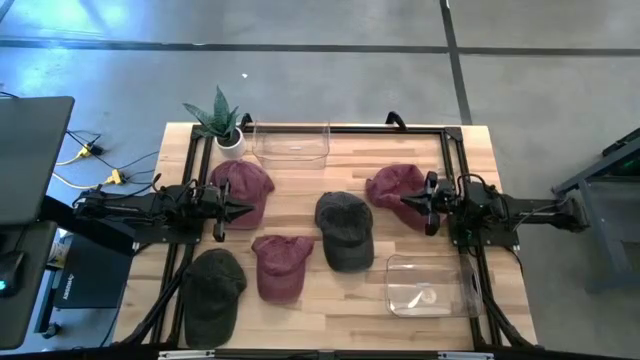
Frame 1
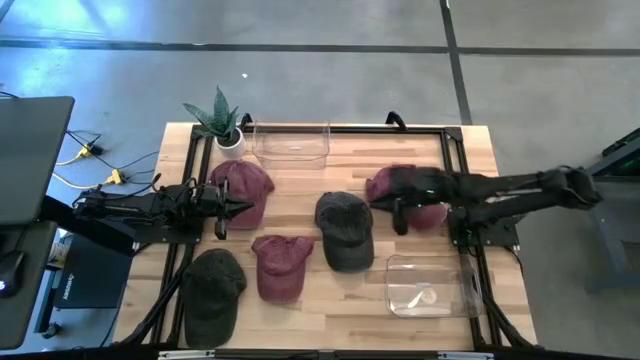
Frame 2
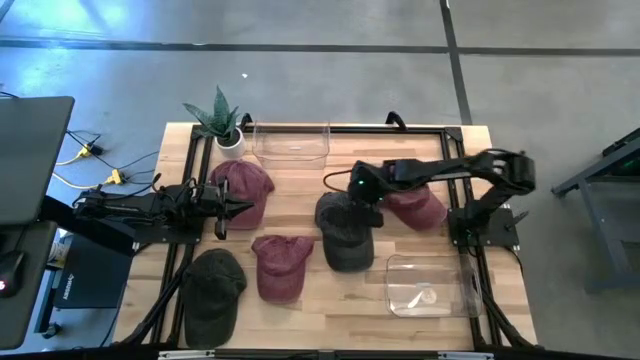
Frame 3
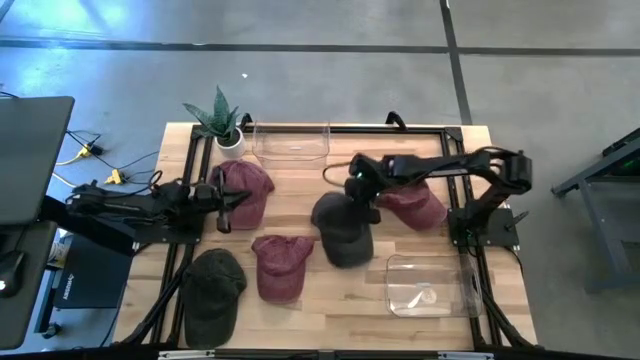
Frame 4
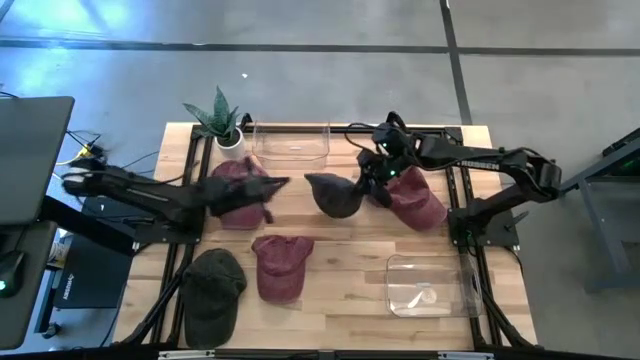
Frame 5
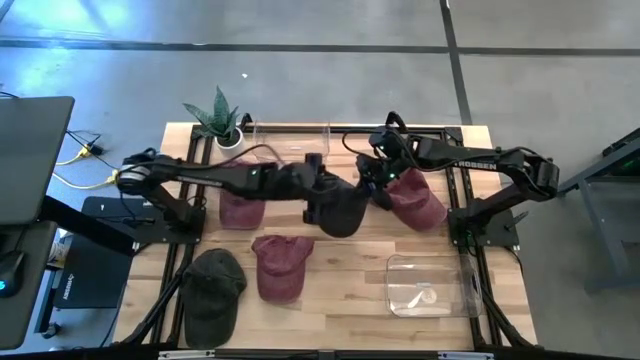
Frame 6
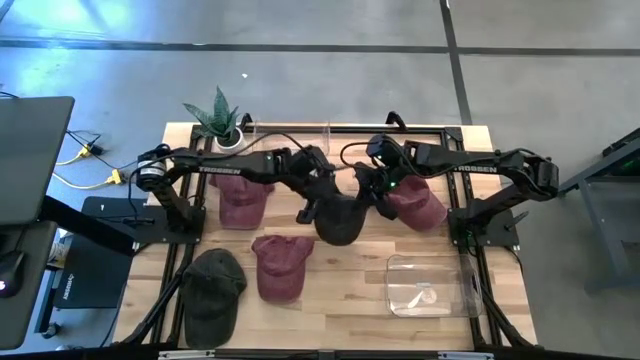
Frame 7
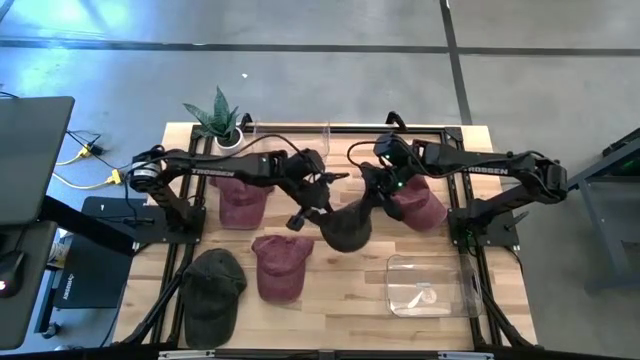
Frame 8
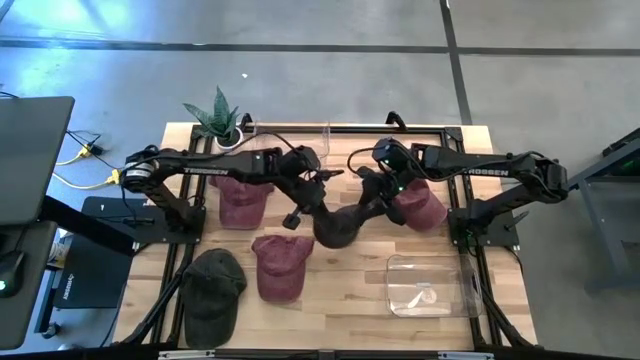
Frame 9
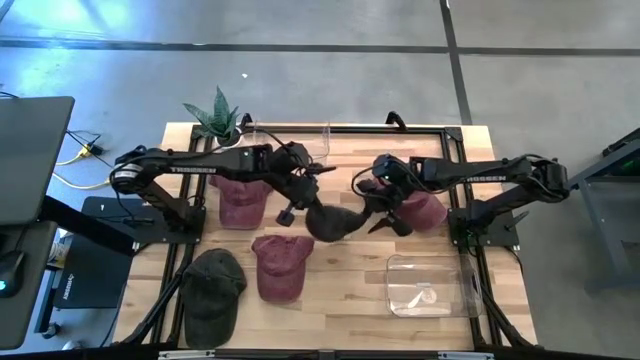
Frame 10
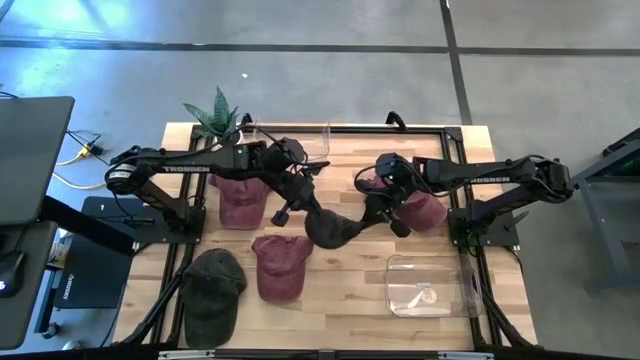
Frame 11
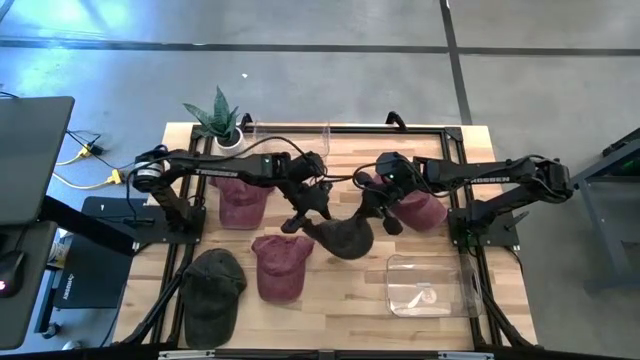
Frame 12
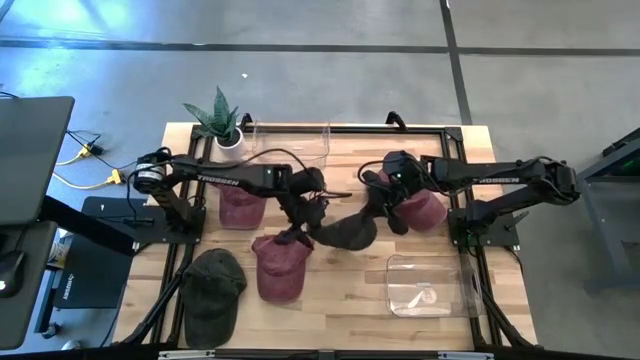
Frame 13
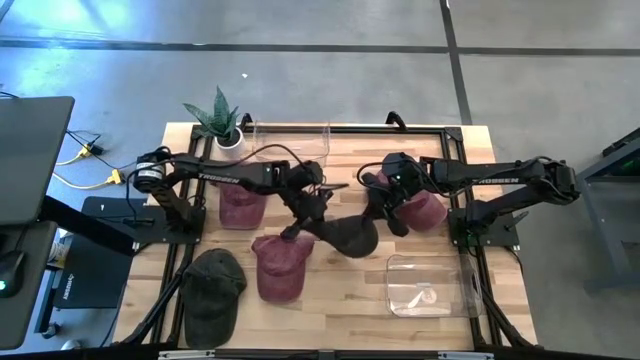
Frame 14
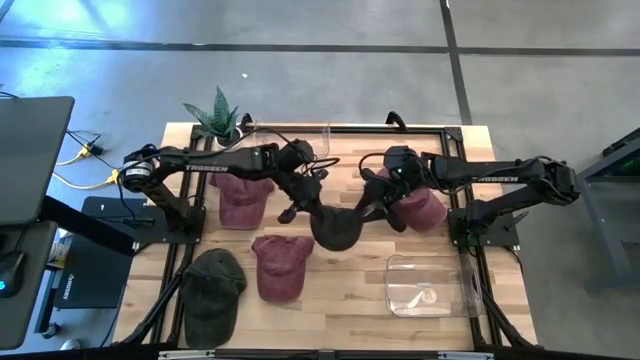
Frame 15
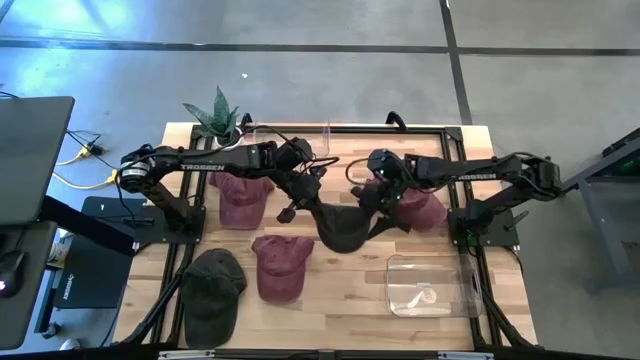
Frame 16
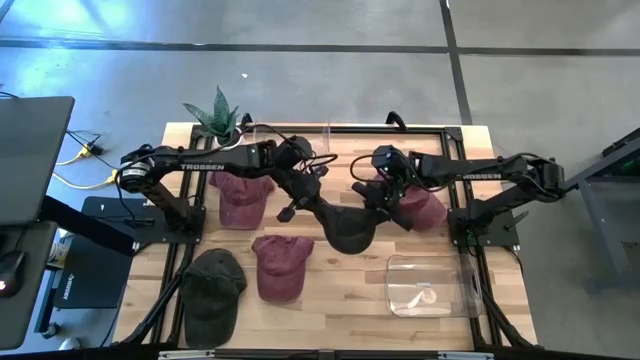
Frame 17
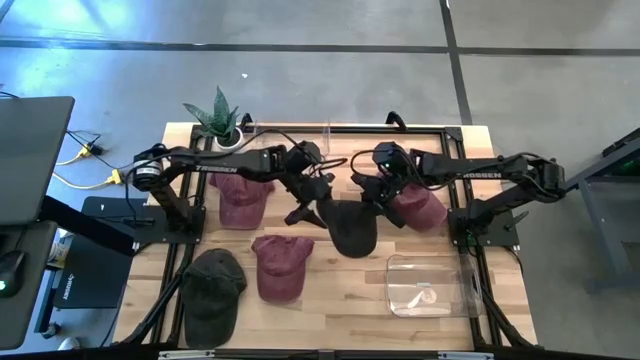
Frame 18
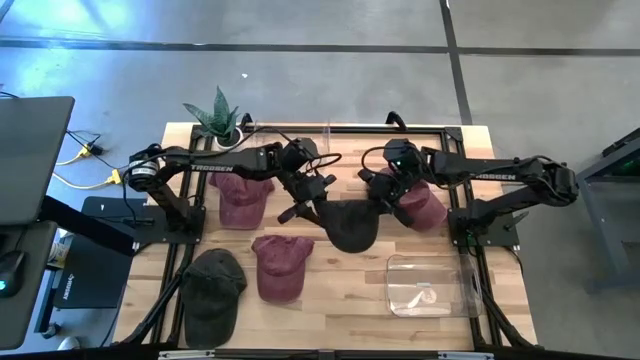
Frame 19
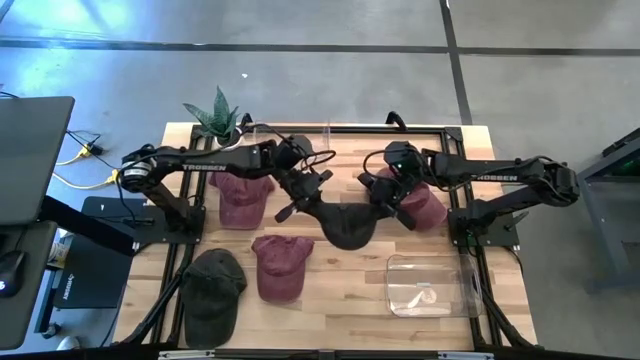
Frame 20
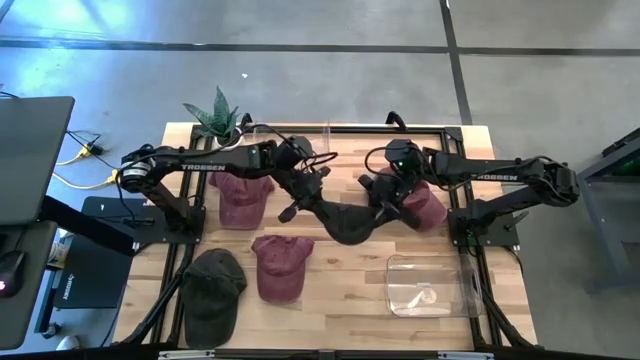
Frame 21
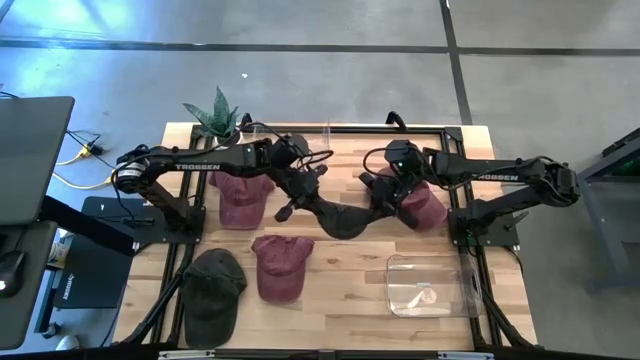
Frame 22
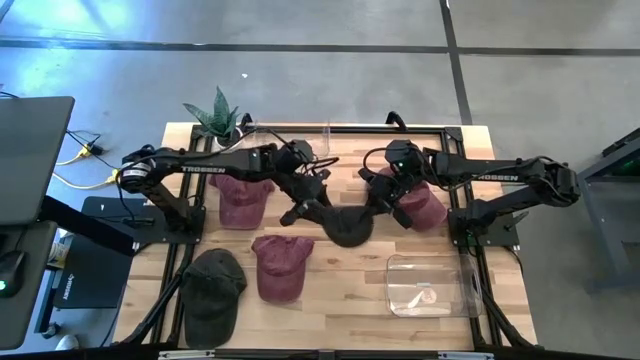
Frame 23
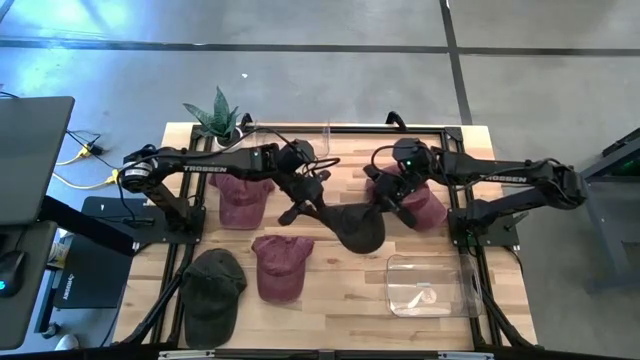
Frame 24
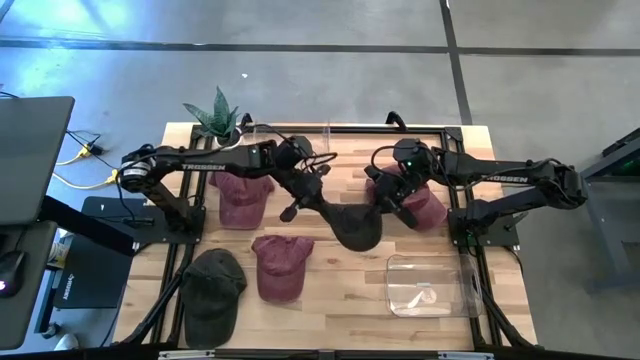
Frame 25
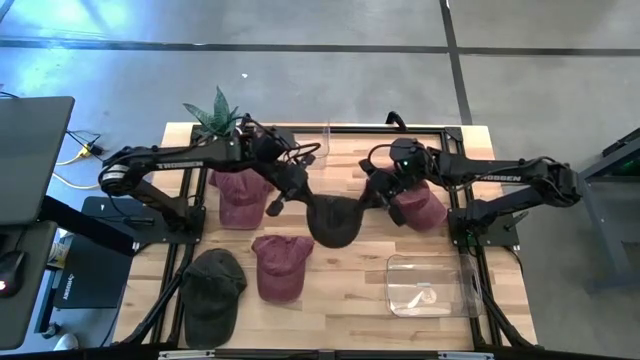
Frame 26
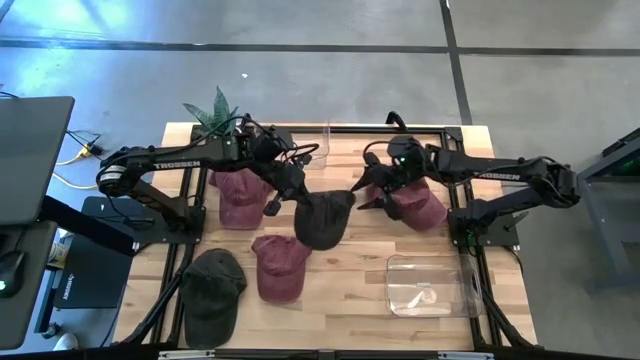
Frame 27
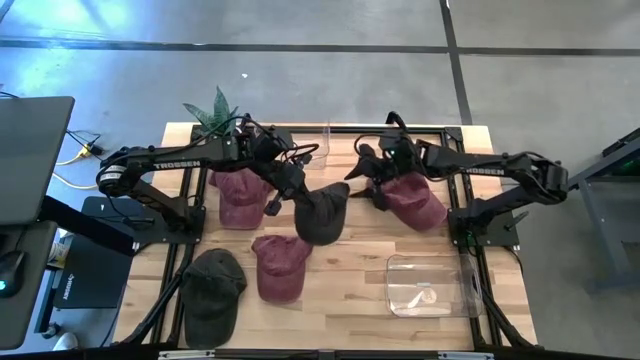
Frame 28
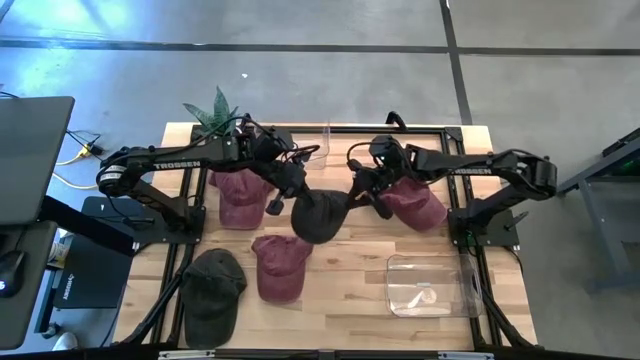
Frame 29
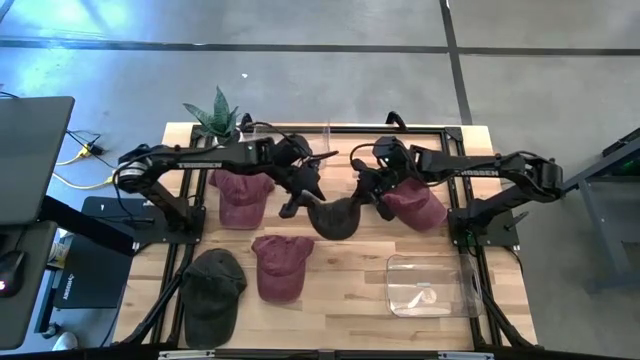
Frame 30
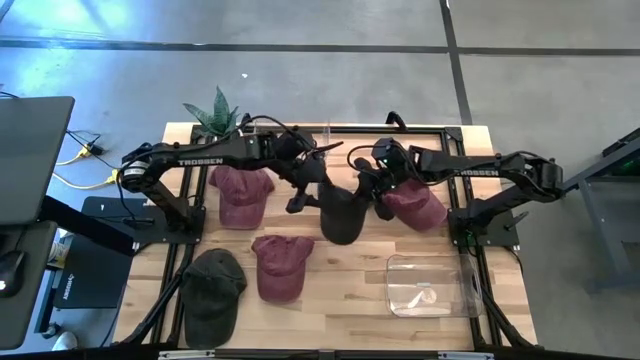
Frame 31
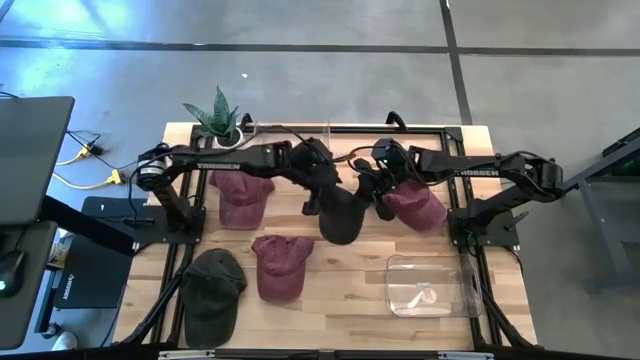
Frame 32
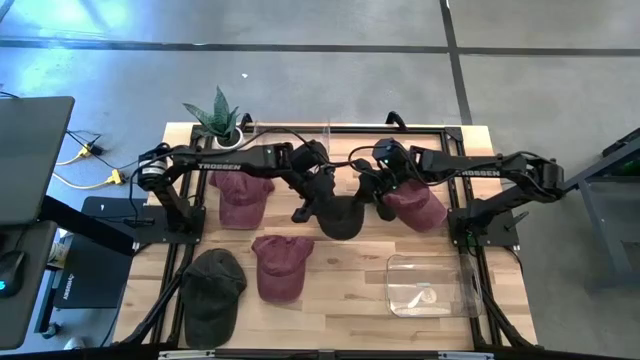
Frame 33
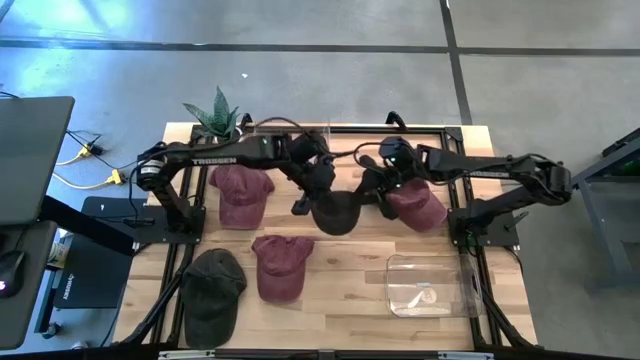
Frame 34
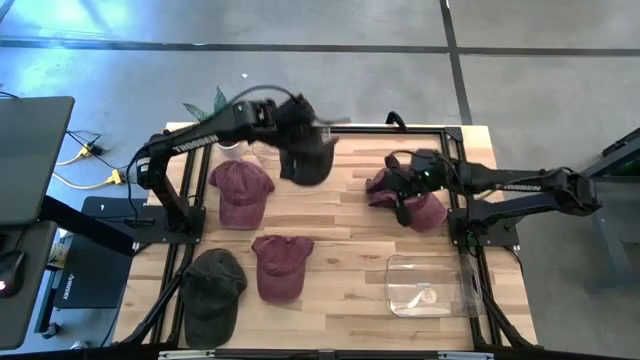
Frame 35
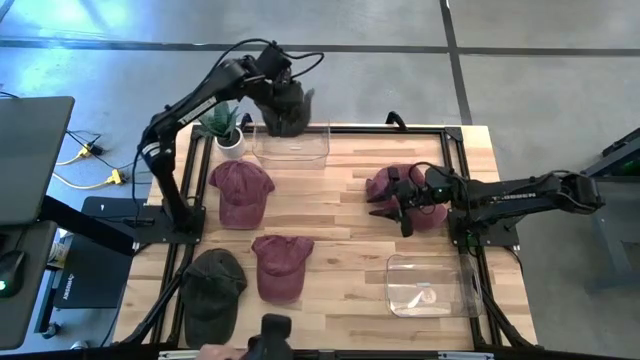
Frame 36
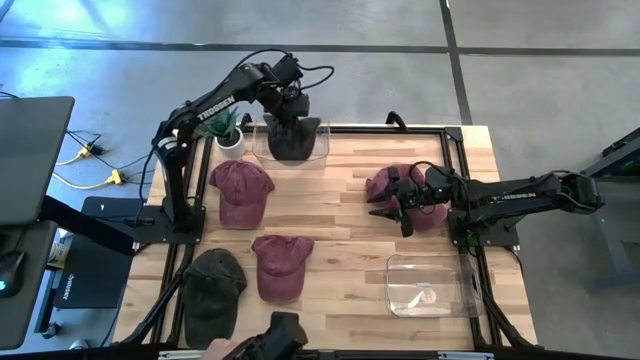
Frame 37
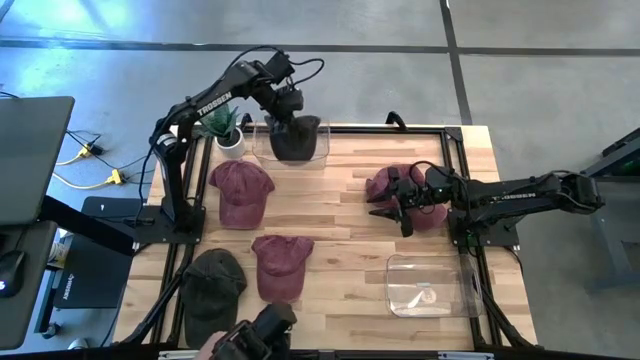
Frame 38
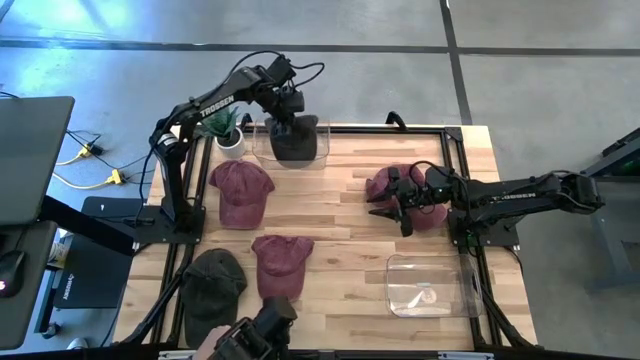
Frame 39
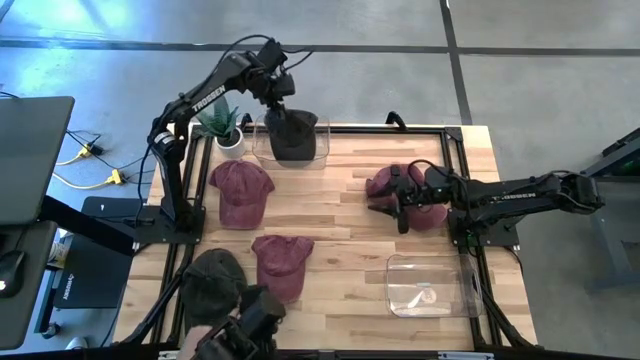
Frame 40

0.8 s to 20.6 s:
Task: Pick & Place hat
Put the top black cap into the top transparent bin
